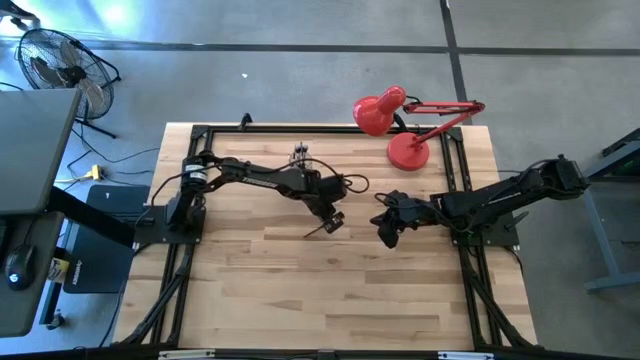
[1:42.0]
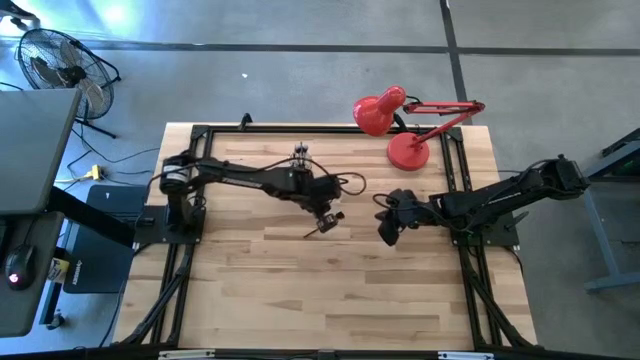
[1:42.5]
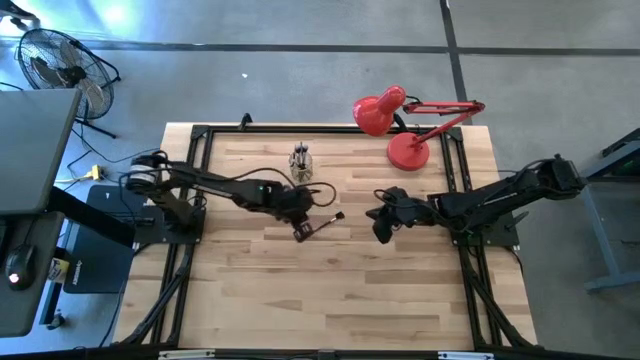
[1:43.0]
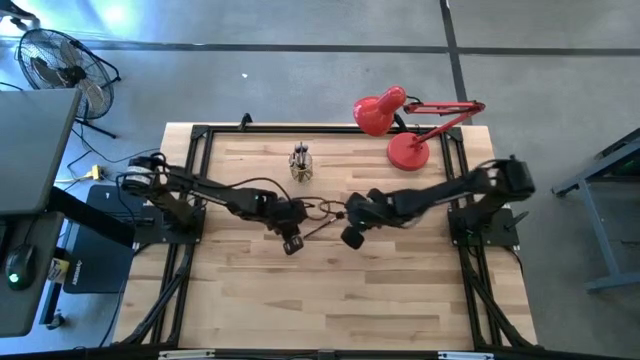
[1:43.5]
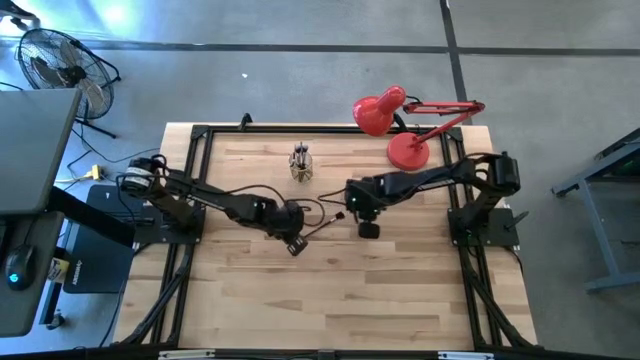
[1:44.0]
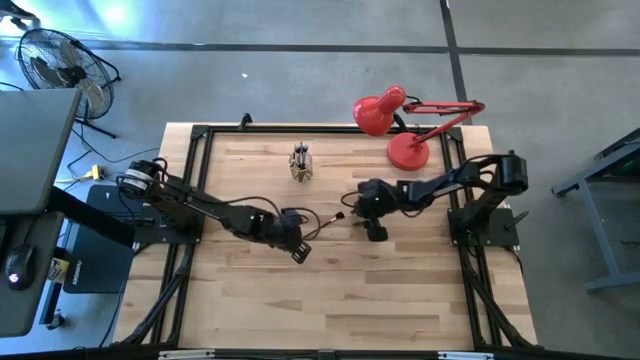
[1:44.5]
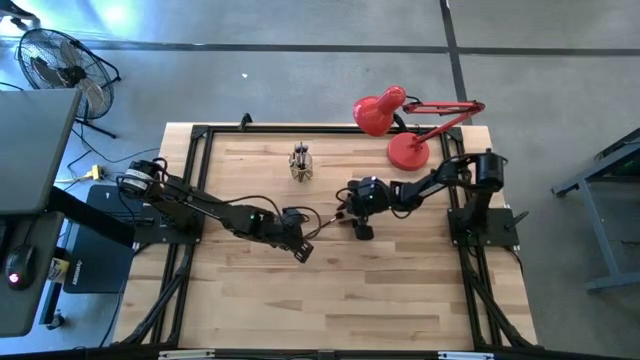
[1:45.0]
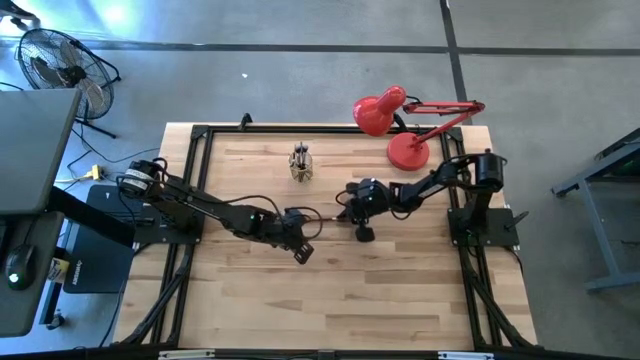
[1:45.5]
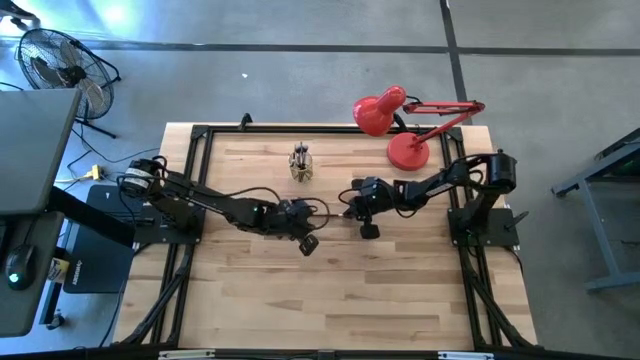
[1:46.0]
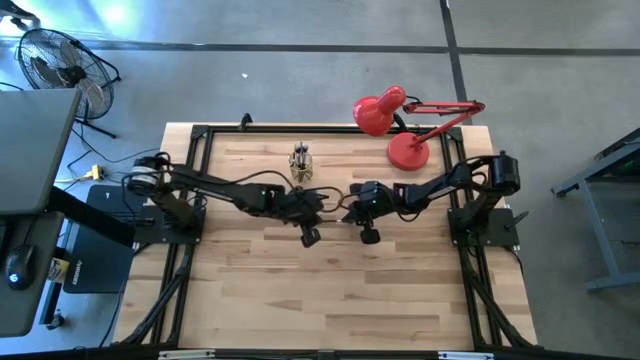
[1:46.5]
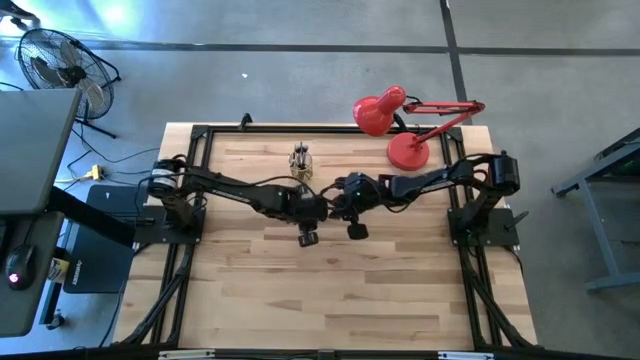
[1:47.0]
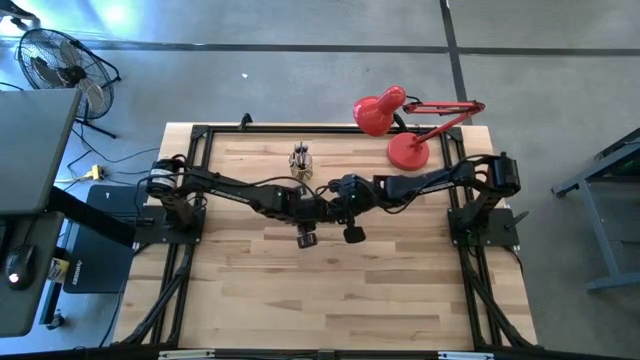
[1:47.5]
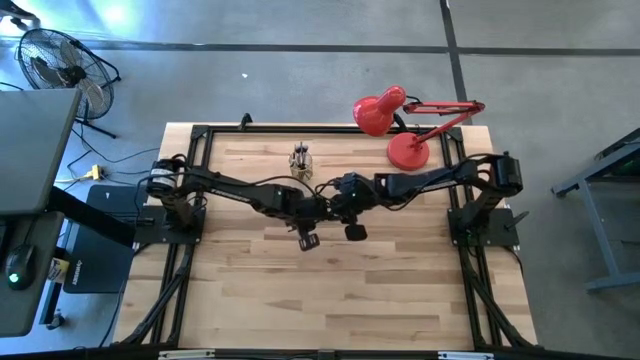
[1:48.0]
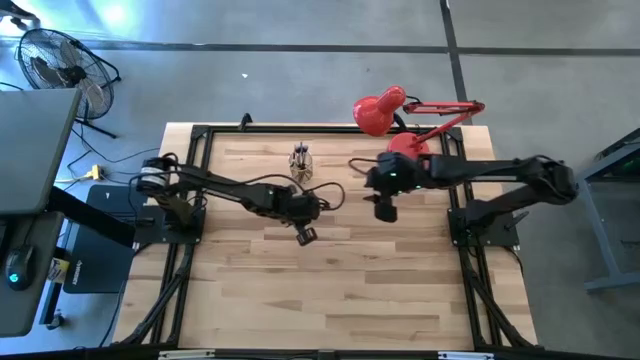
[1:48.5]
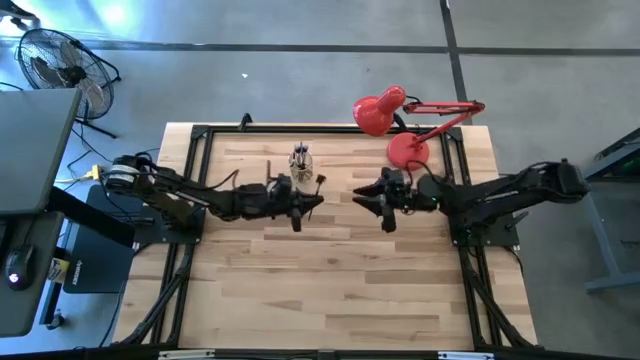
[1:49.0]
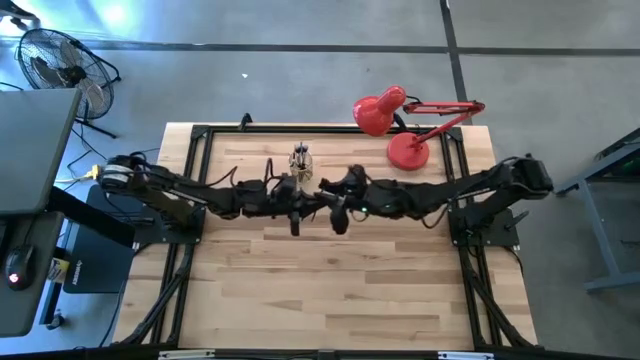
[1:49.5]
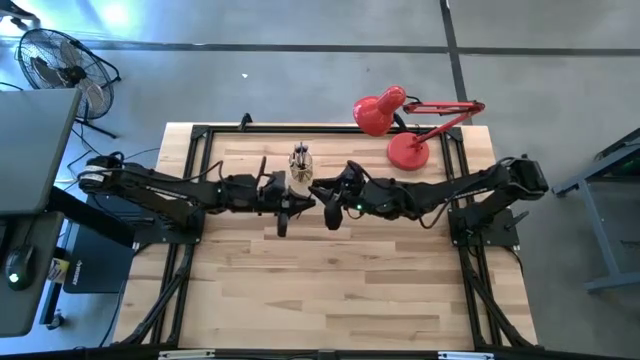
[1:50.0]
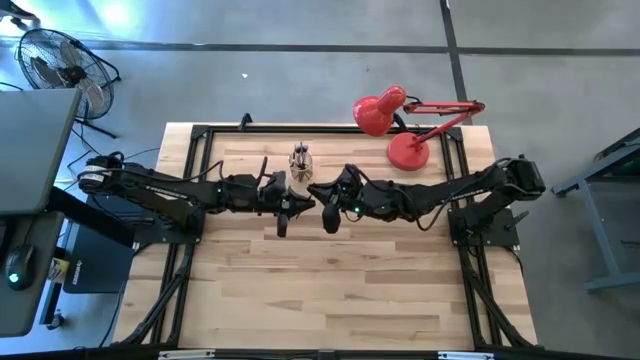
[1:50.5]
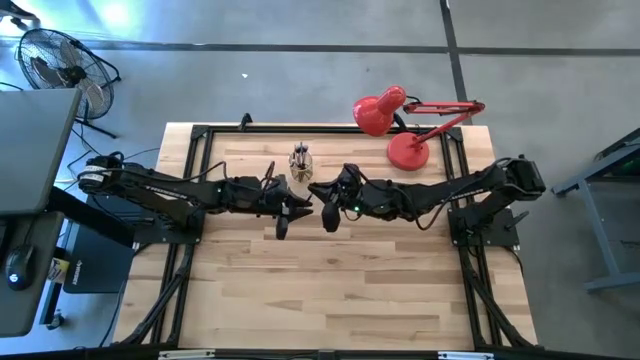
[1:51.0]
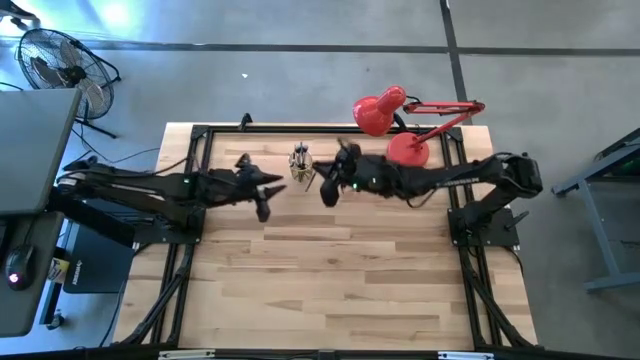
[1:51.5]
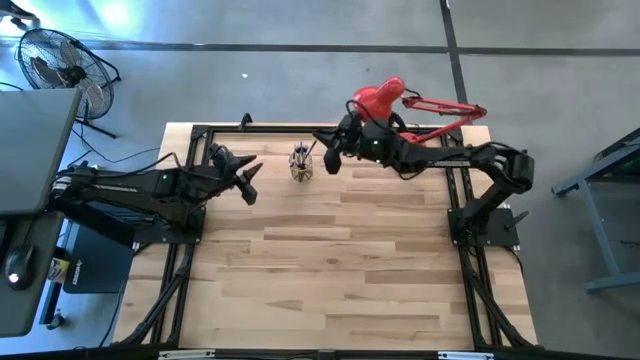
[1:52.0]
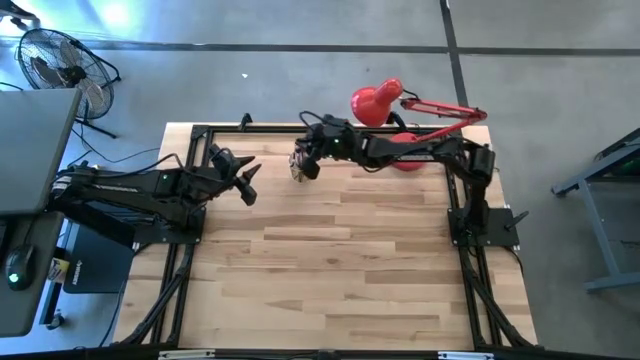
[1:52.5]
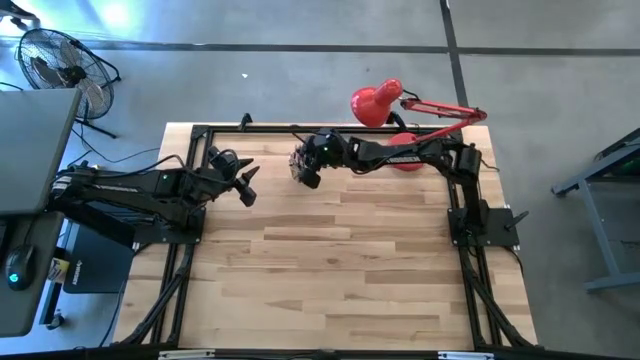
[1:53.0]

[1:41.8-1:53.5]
Task: Put items in baskets/containers
Put the lash brush into the wire organizer

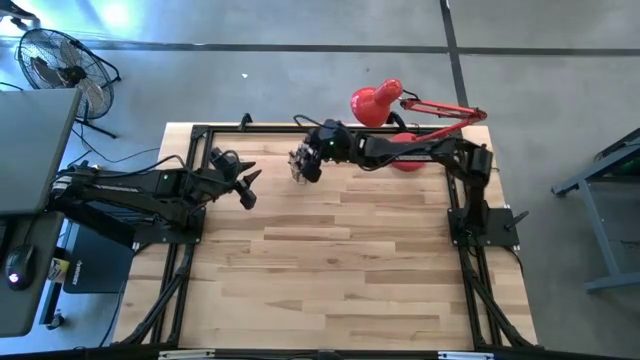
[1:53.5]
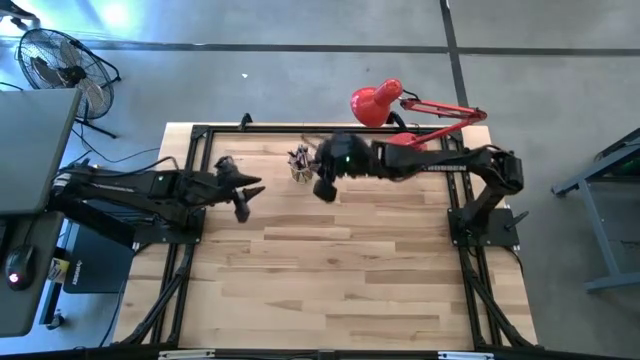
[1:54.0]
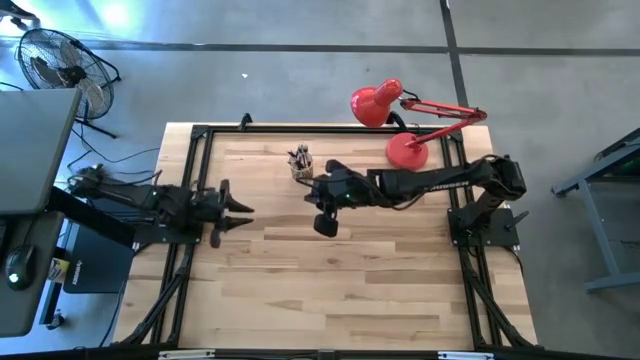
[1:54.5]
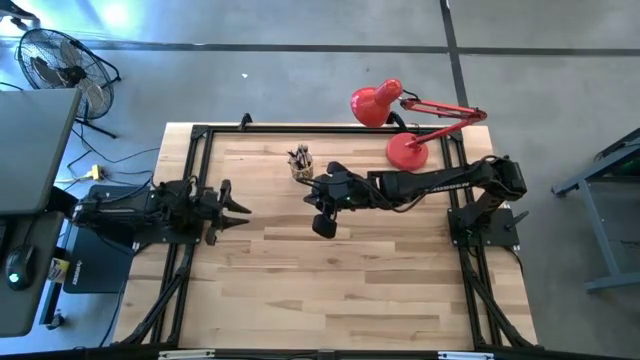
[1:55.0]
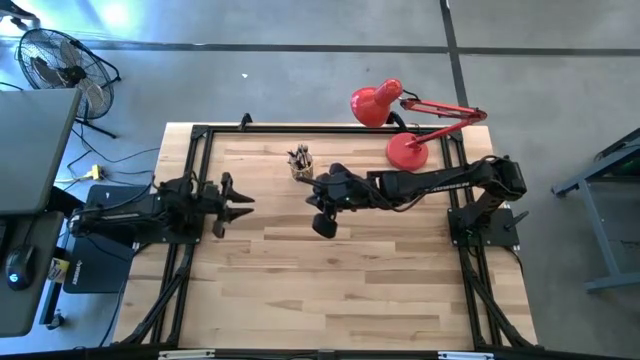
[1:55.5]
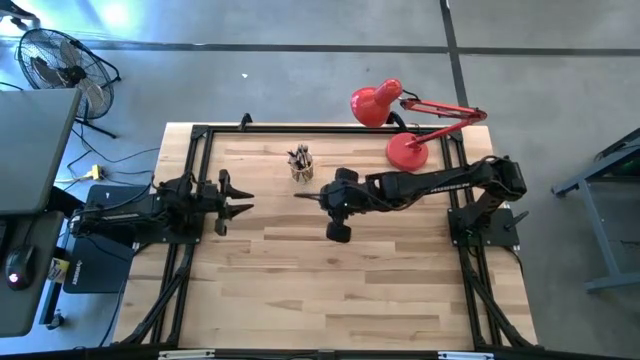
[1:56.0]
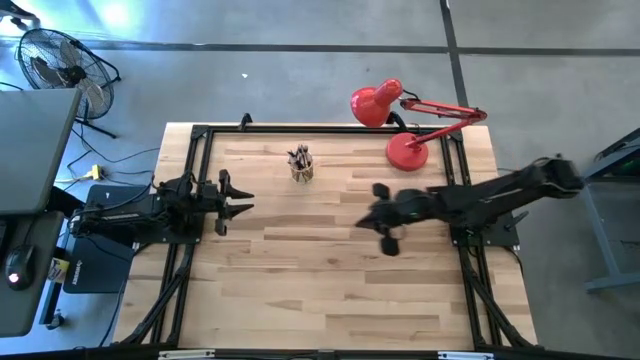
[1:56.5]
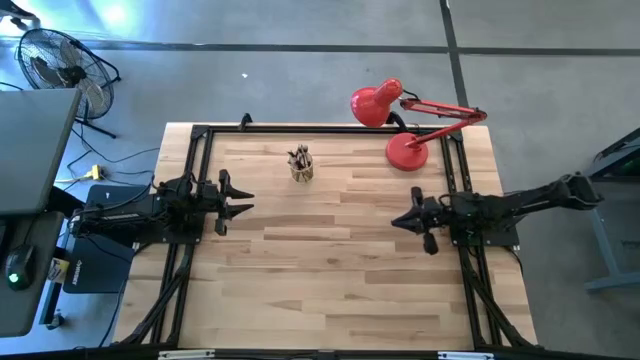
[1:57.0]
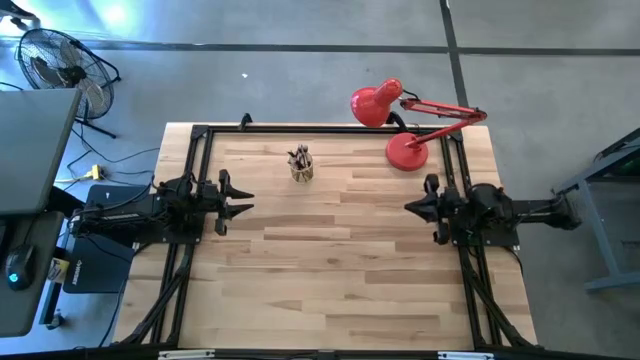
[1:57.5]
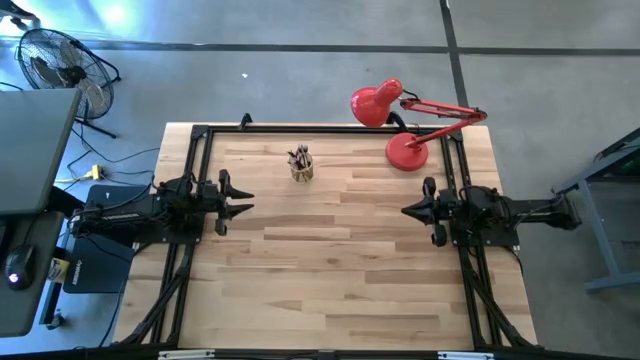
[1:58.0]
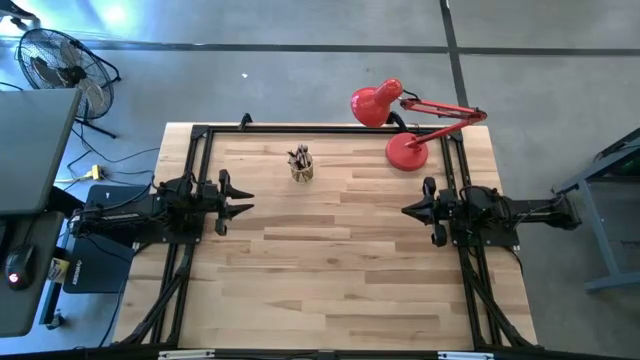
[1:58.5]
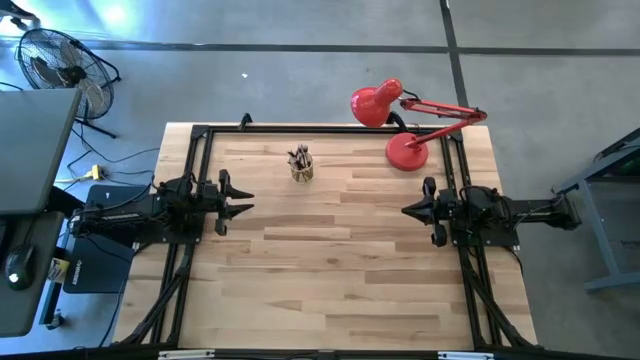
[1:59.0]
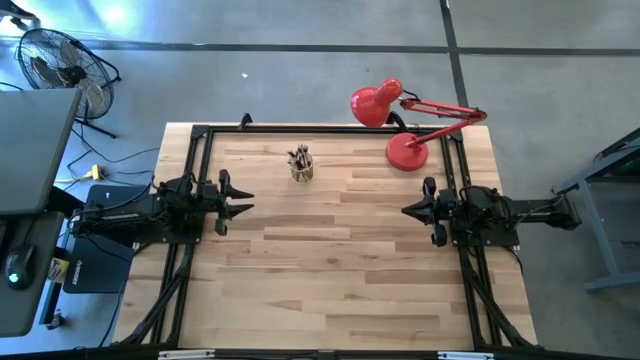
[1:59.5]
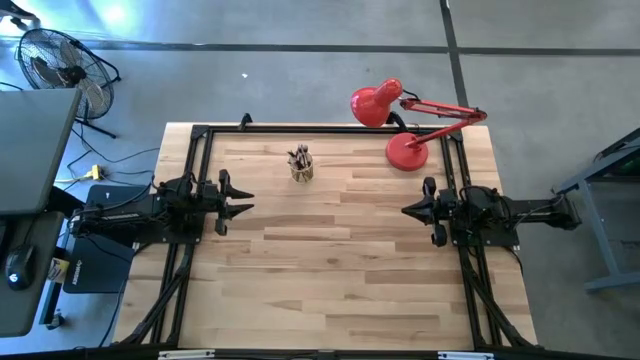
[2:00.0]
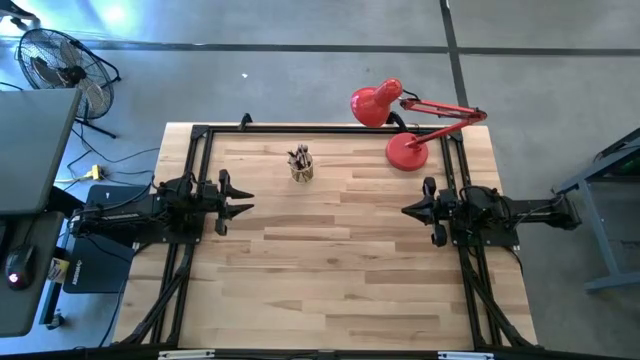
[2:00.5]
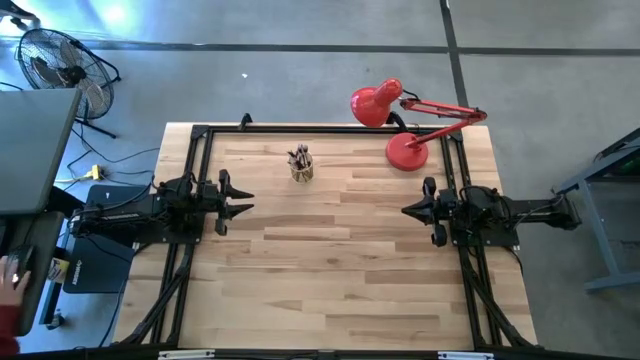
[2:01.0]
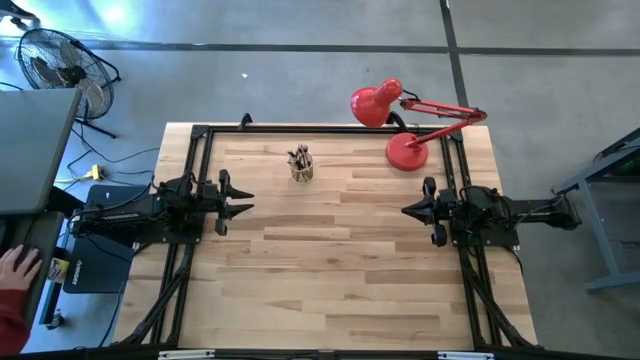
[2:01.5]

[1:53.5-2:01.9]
Return to Home Position

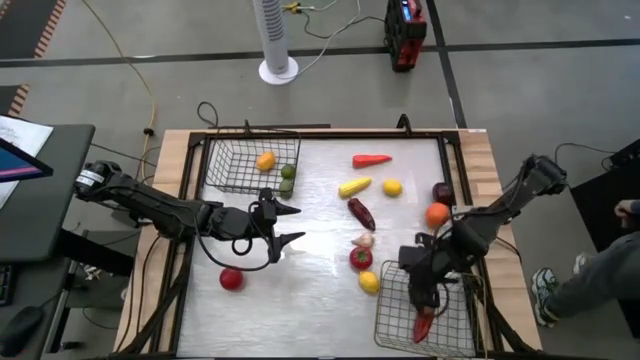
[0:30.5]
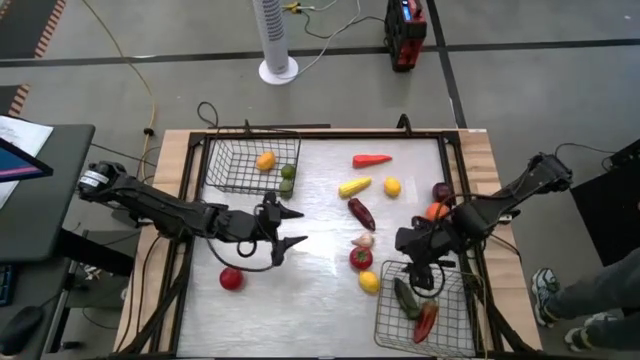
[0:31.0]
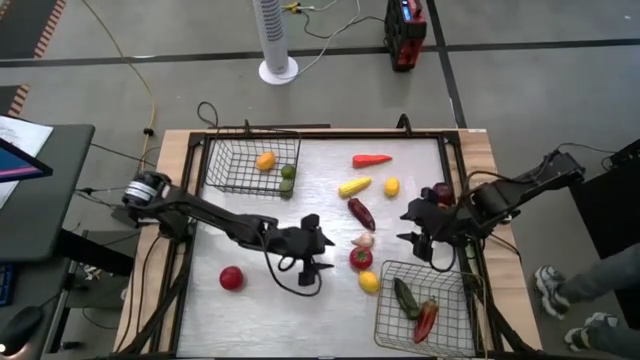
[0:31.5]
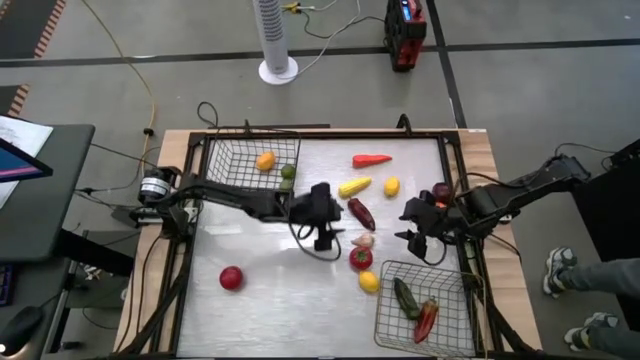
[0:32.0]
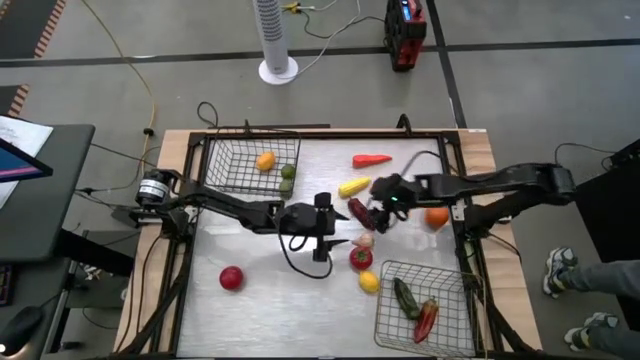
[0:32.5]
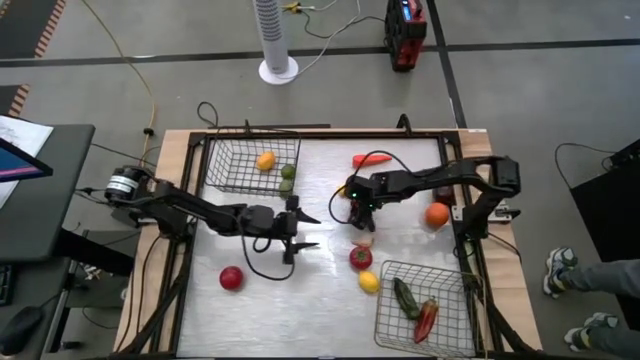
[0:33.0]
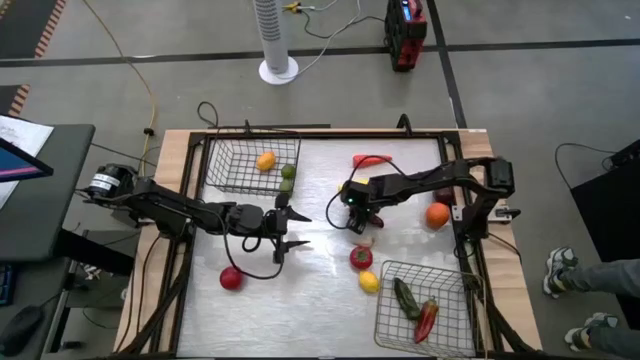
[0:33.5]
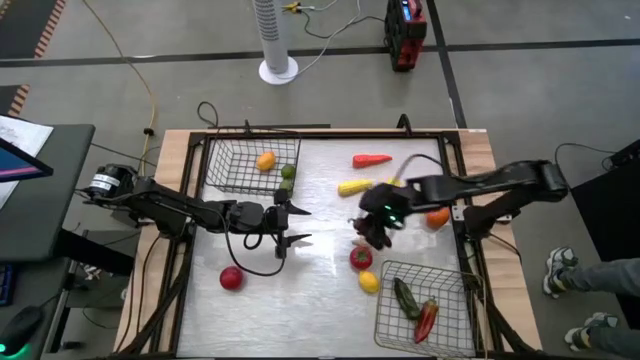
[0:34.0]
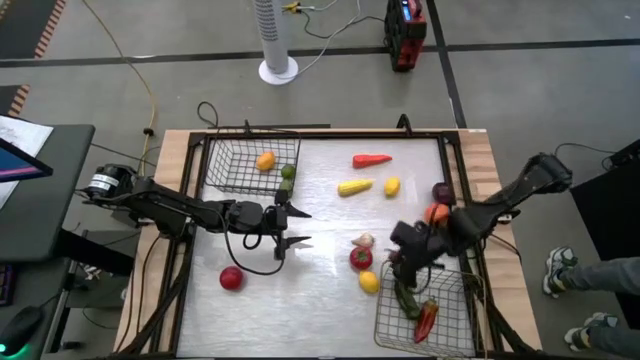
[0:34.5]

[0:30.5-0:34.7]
Task: Sort produce into baskets
Put the red chili pepper into the golden wire basket
